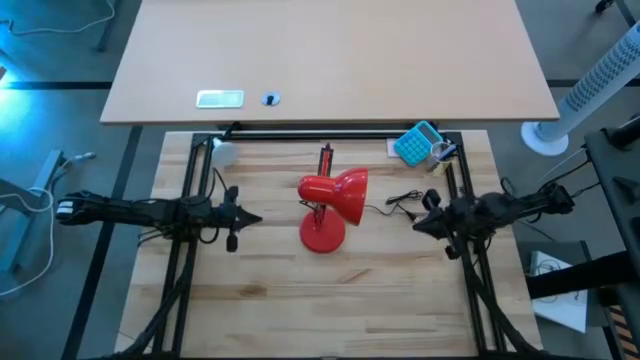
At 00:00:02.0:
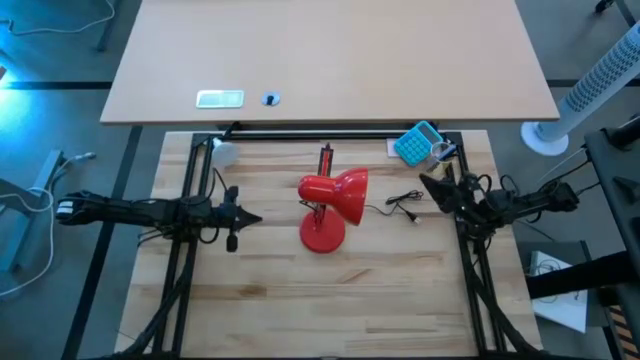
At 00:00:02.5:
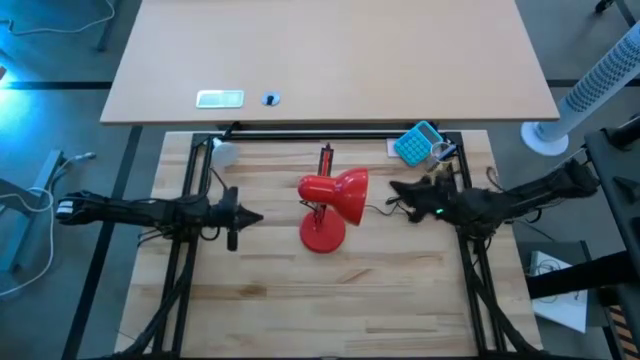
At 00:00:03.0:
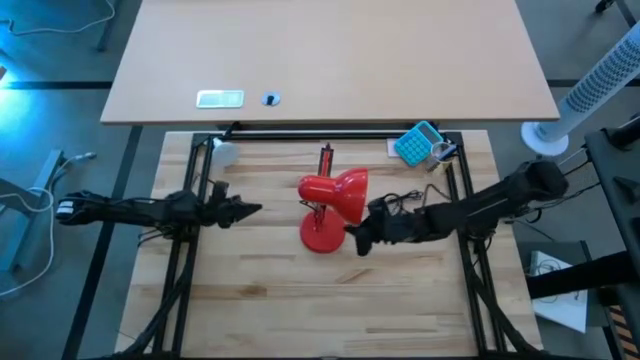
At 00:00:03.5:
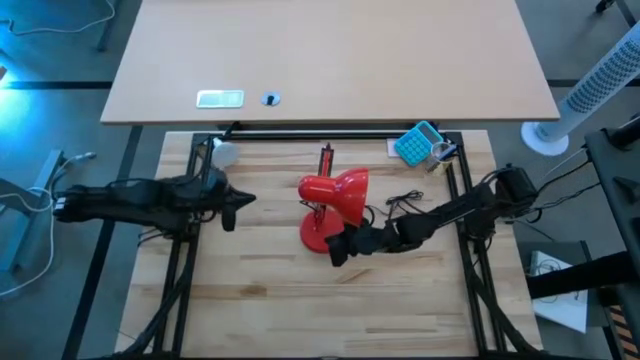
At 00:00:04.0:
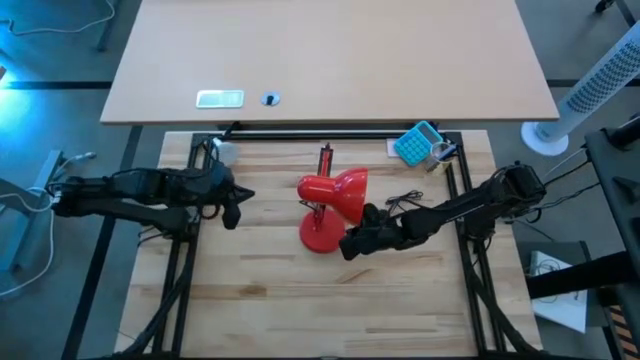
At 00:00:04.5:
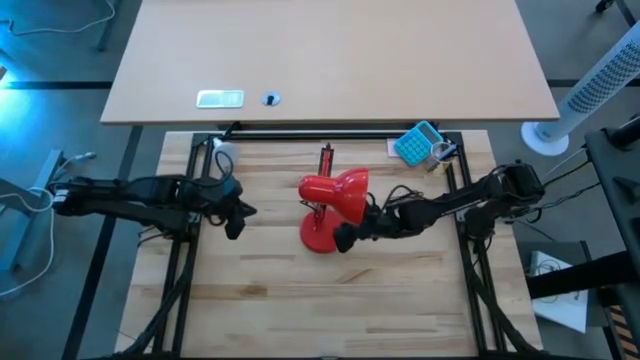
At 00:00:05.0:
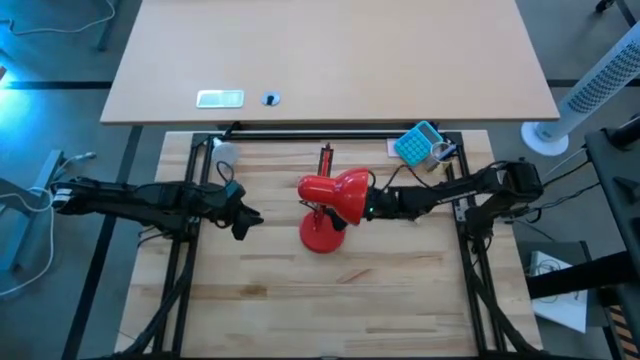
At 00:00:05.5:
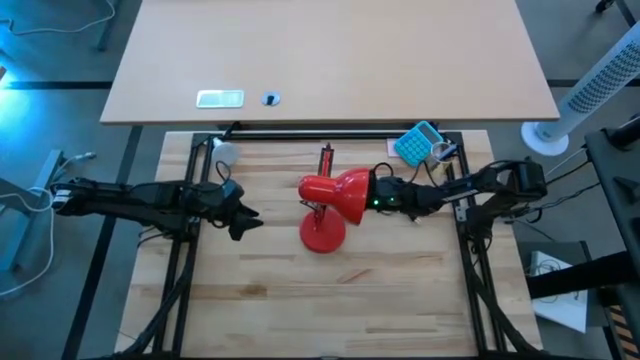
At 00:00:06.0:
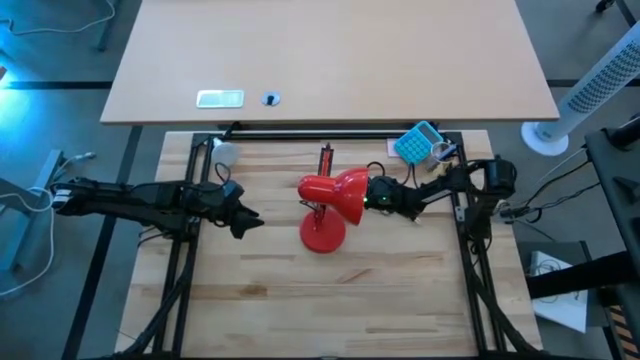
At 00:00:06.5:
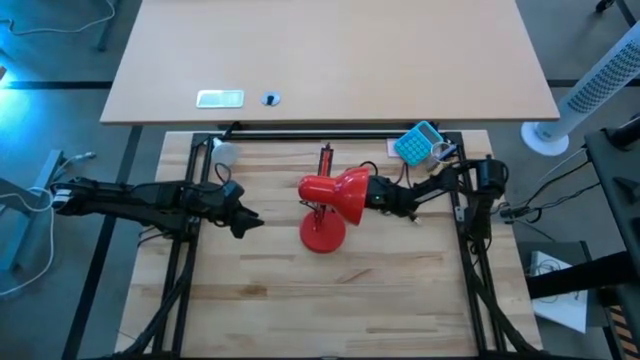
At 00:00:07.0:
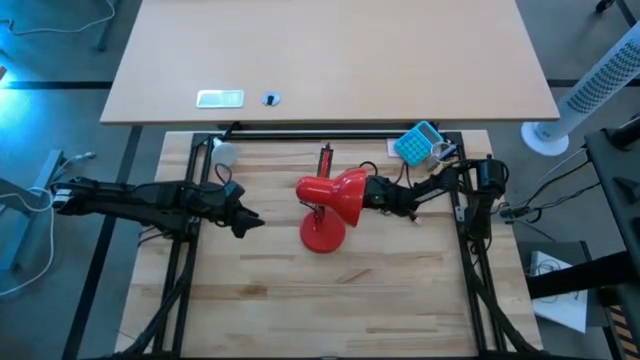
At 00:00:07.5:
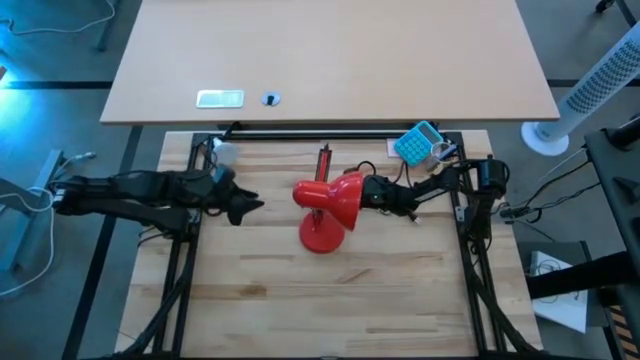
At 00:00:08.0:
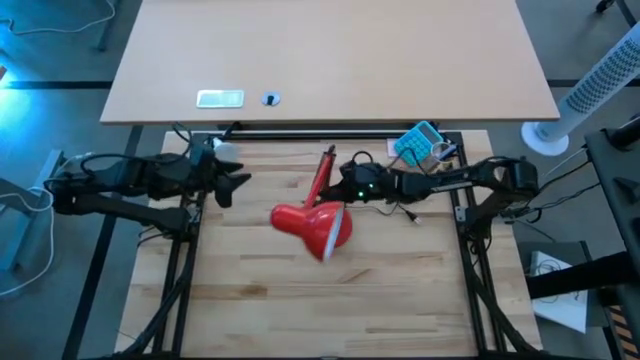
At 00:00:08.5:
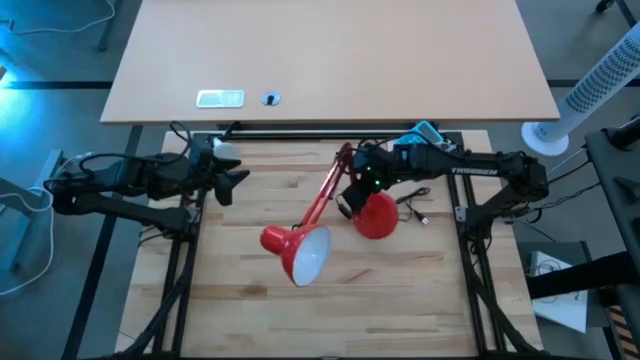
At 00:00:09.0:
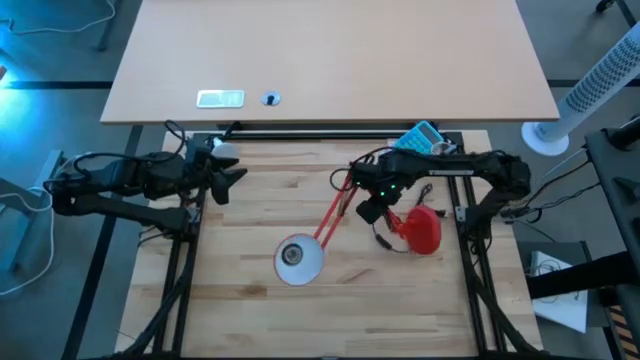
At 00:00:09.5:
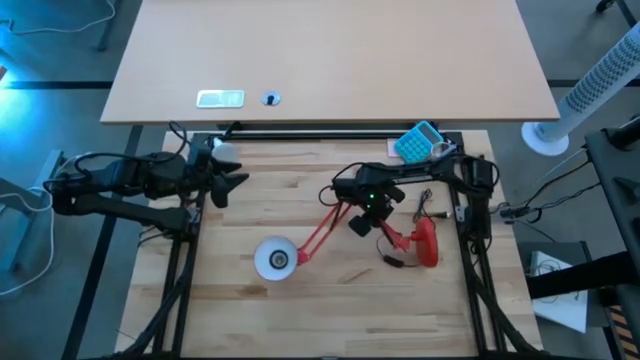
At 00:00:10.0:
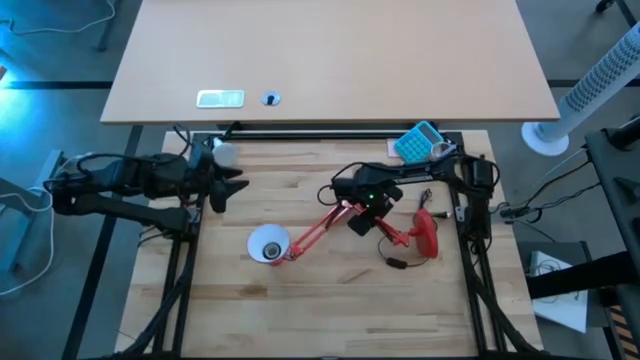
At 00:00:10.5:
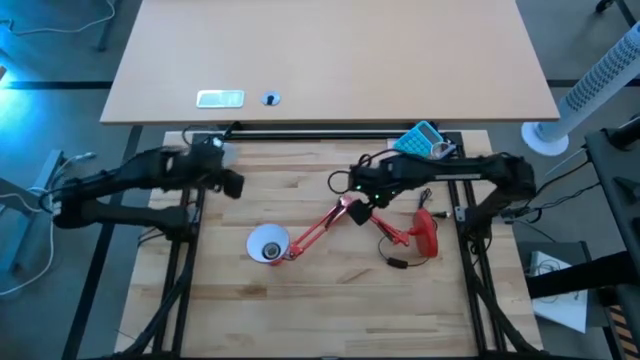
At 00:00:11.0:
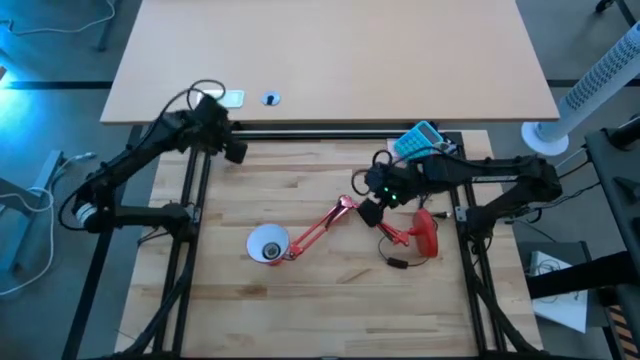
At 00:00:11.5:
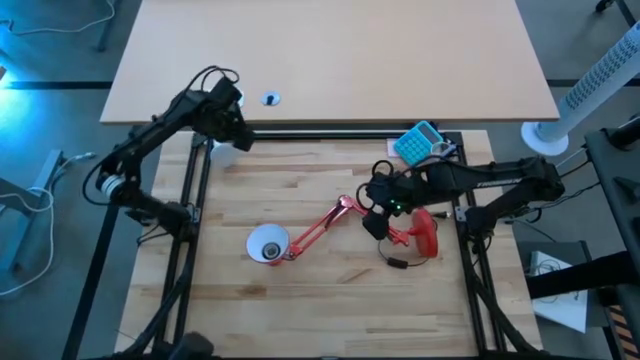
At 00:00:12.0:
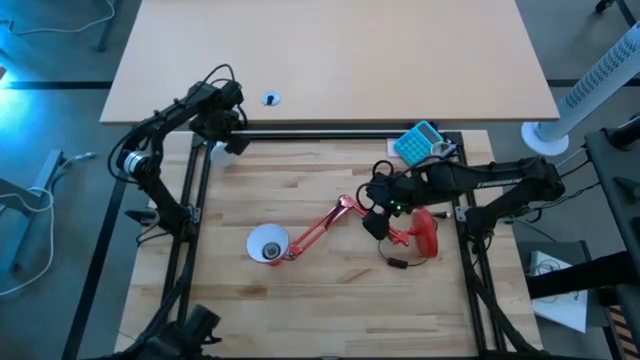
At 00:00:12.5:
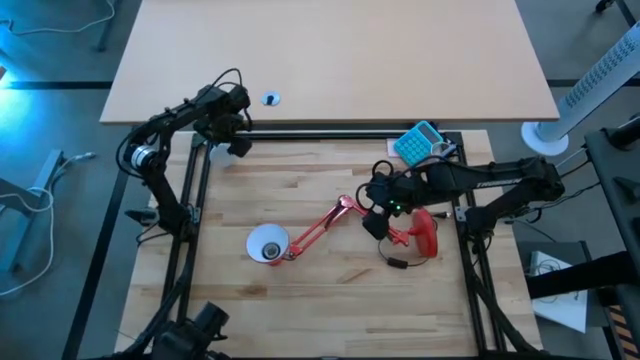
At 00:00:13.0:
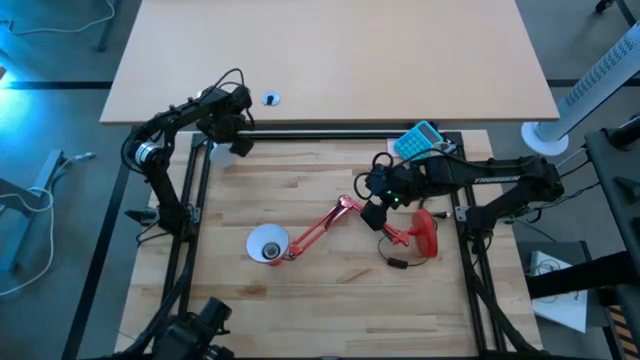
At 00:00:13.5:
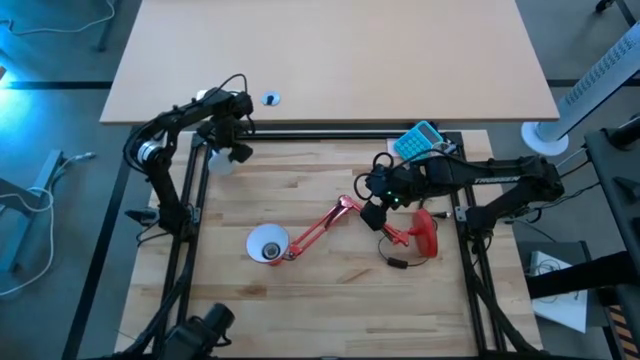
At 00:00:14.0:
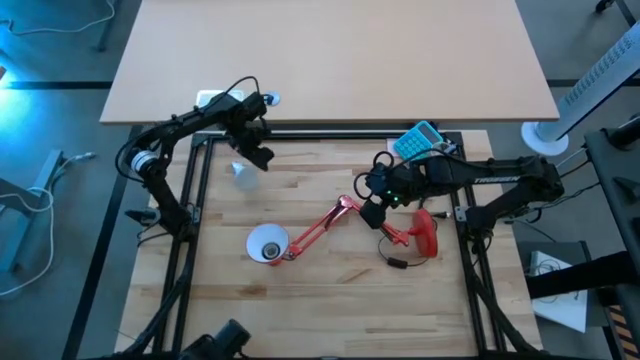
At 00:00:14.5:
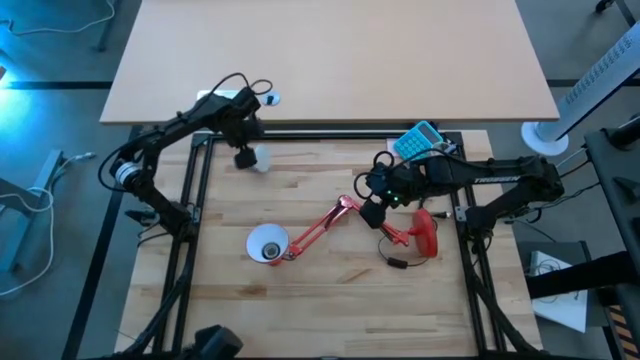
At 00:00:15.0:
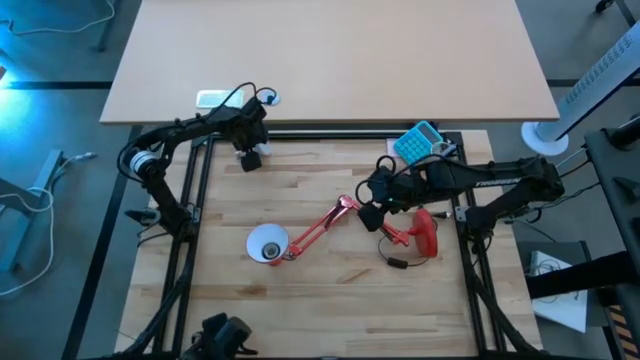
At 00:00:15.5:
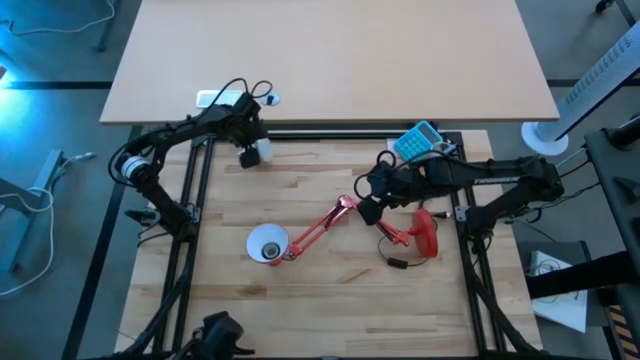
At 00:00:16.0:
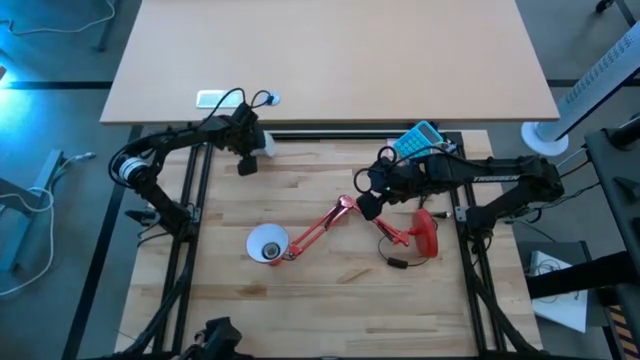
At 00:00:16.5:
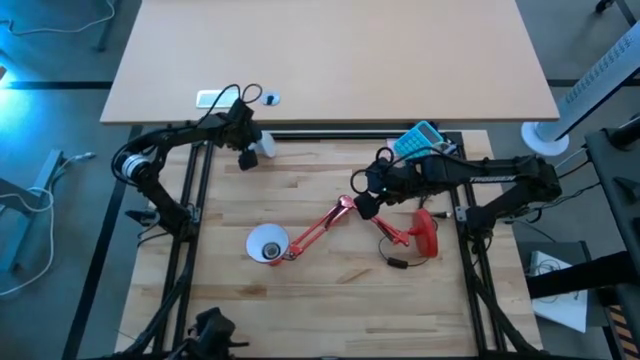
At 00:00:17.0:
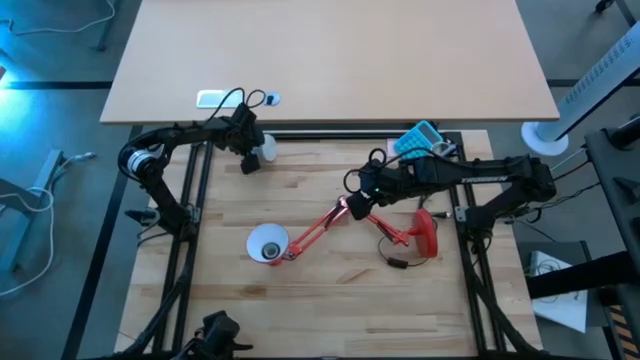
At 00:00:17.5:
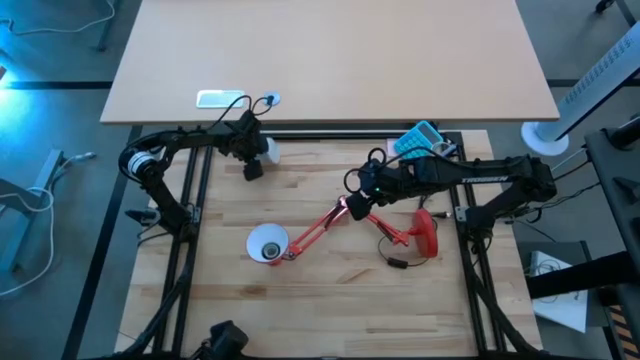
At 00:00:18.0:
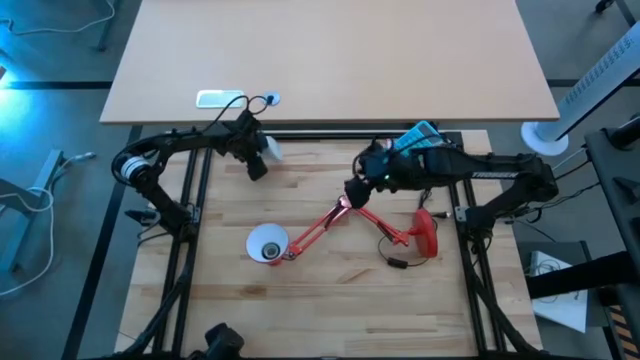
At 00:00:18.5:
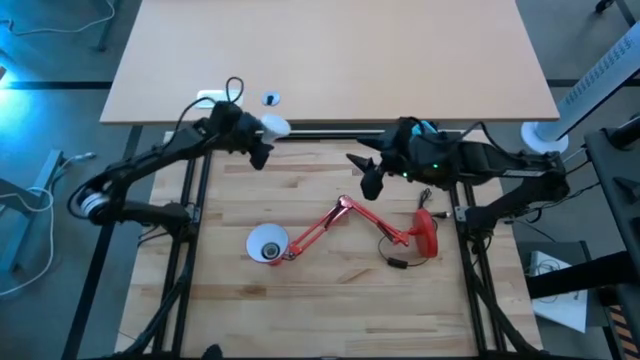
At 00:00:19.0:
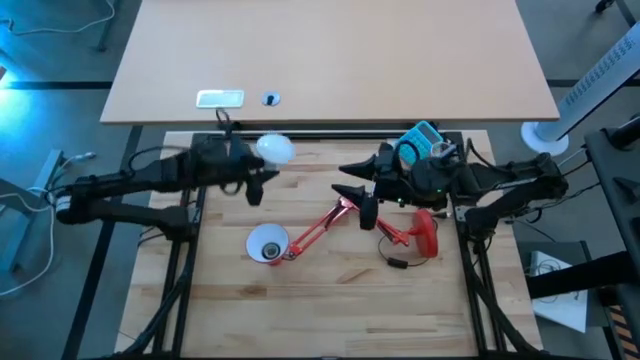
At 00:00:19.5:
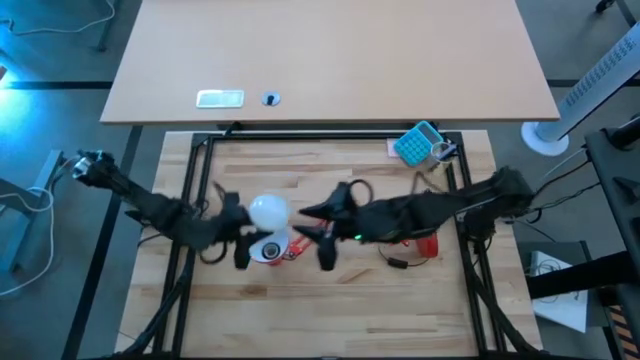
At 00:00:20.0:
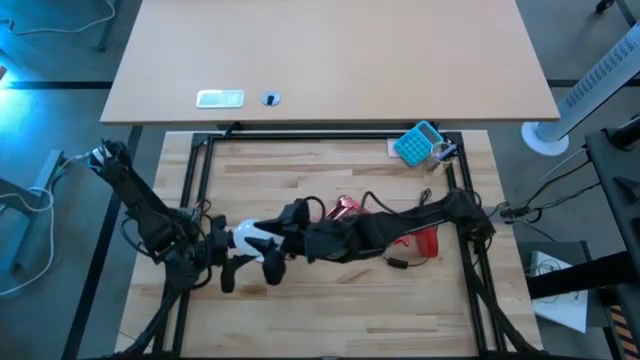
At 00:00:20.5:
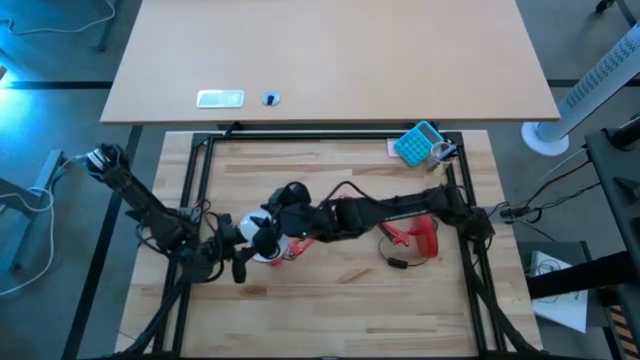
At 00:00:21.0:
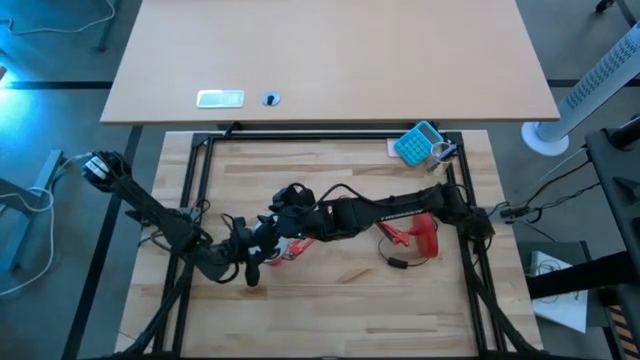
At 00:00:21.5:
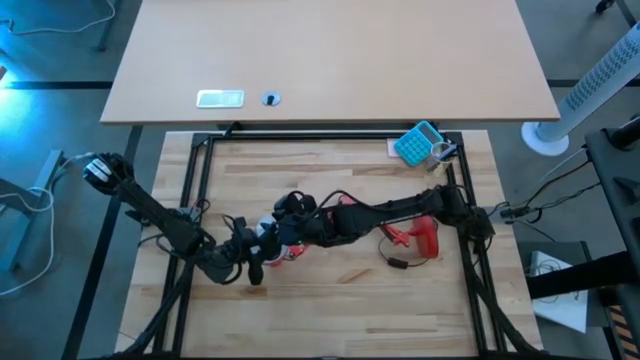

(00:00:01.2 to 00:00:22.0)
Task: Screw lightbulb
Insert the lightbulb into the orange desk lamp
